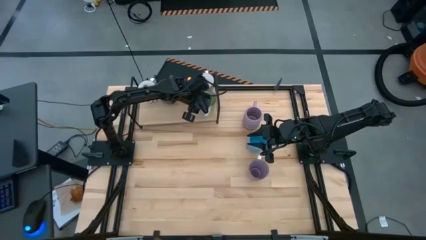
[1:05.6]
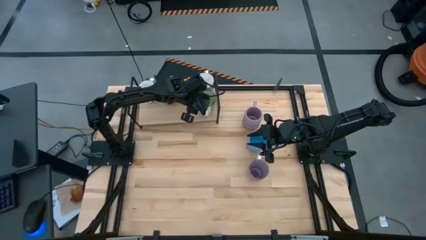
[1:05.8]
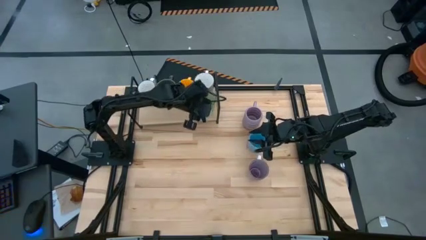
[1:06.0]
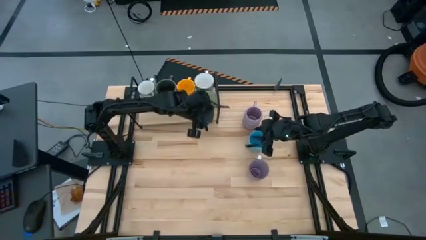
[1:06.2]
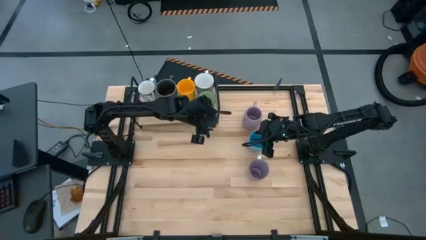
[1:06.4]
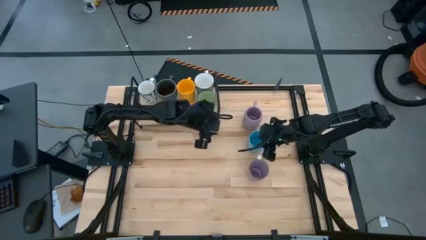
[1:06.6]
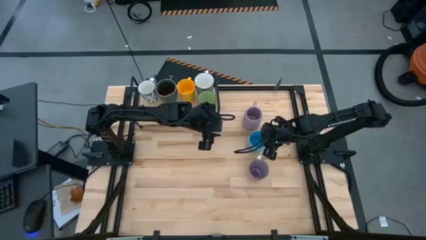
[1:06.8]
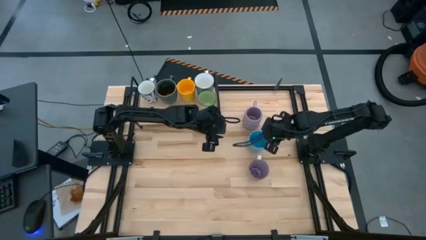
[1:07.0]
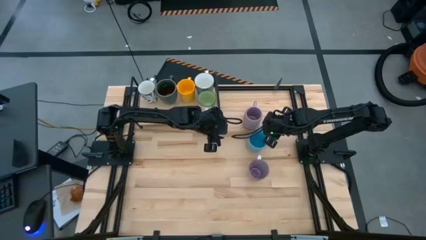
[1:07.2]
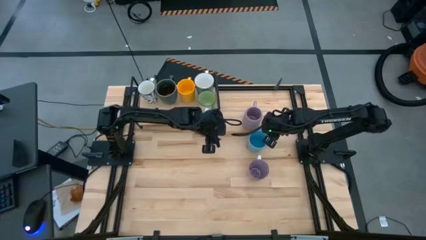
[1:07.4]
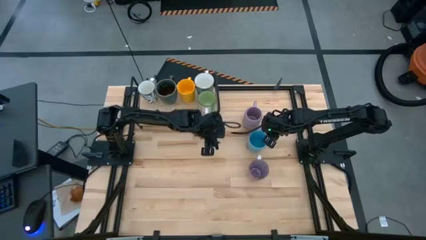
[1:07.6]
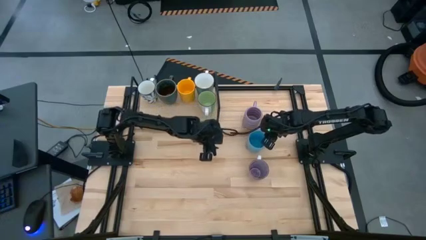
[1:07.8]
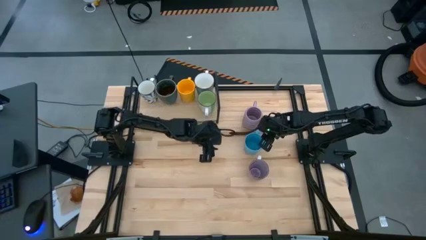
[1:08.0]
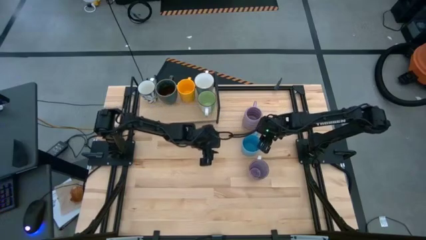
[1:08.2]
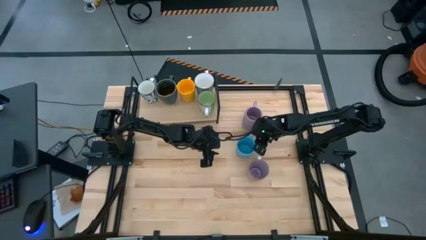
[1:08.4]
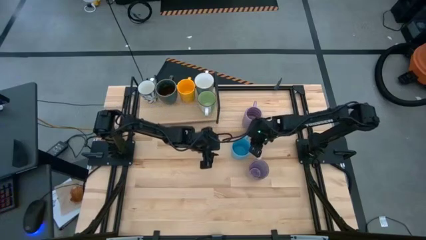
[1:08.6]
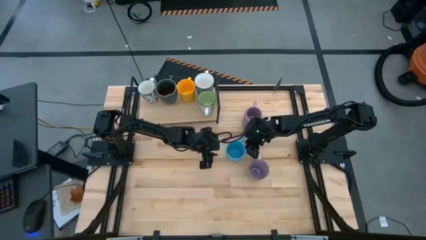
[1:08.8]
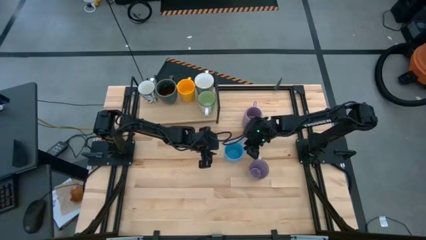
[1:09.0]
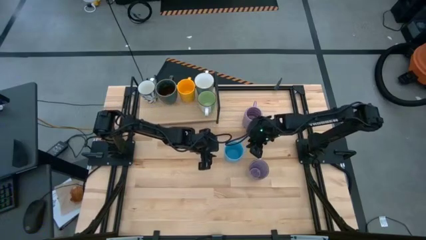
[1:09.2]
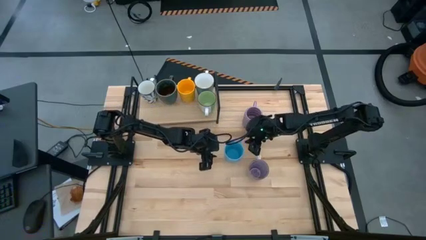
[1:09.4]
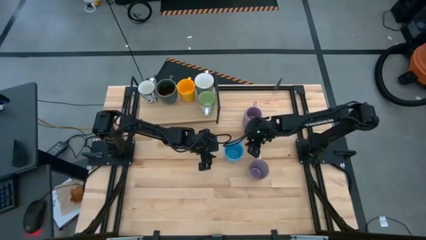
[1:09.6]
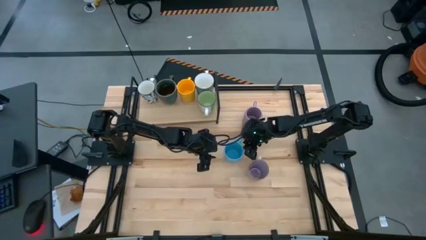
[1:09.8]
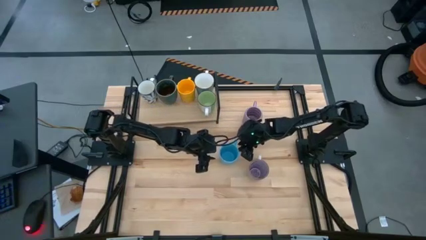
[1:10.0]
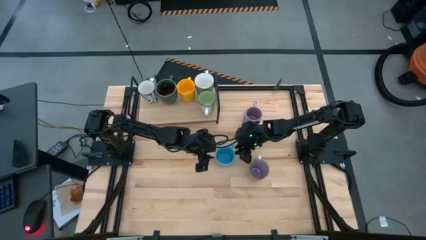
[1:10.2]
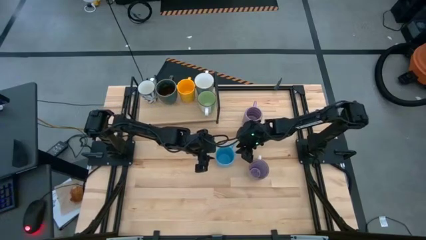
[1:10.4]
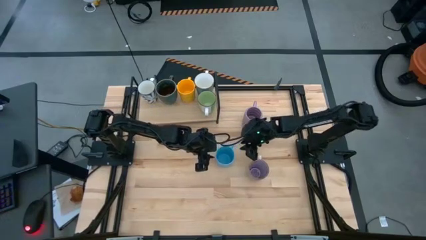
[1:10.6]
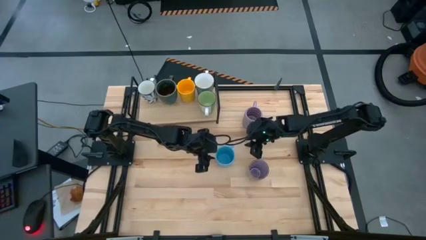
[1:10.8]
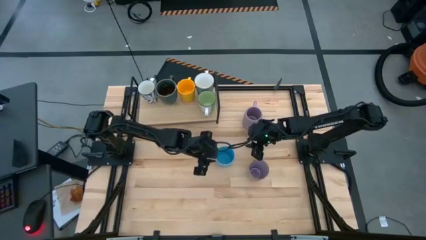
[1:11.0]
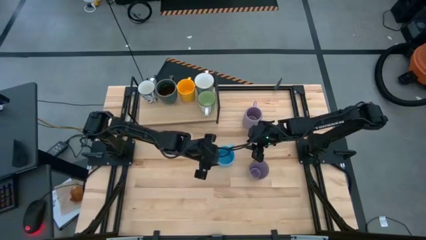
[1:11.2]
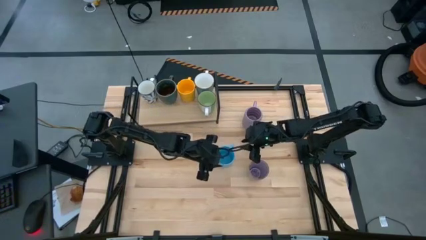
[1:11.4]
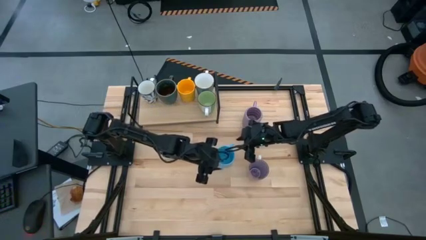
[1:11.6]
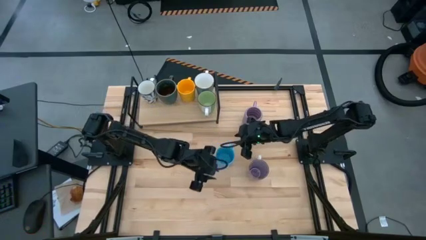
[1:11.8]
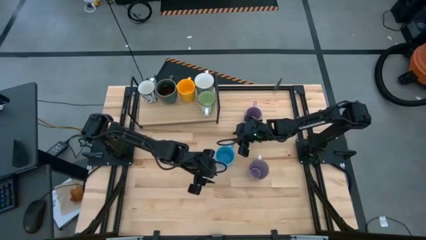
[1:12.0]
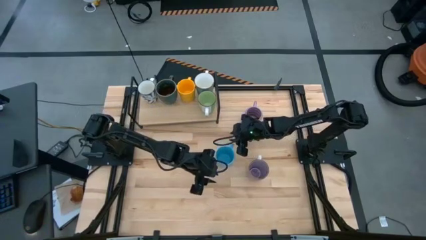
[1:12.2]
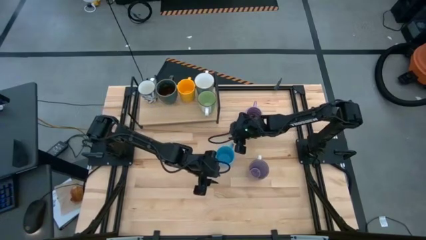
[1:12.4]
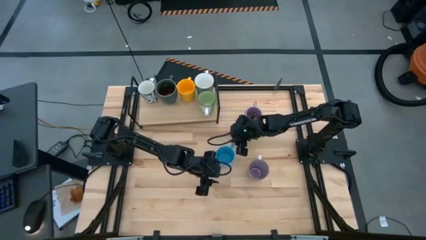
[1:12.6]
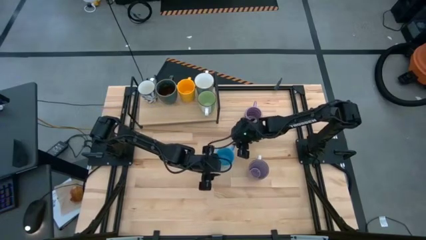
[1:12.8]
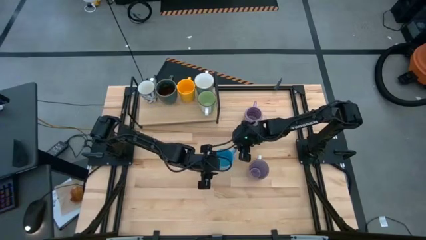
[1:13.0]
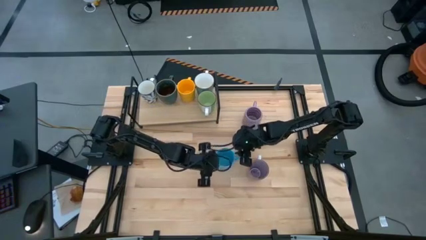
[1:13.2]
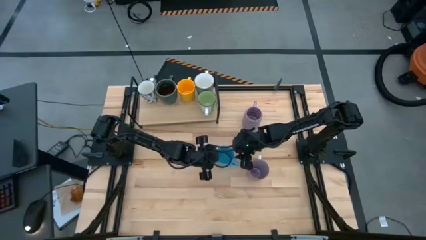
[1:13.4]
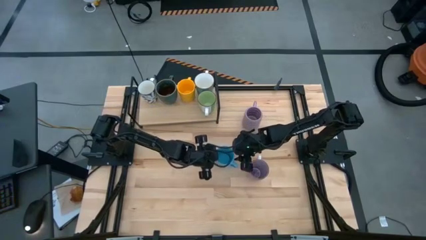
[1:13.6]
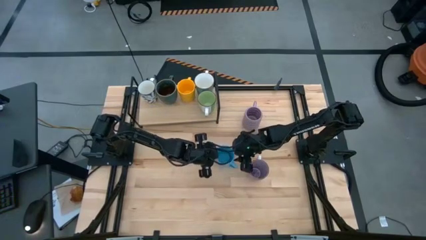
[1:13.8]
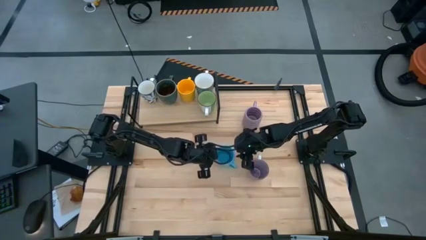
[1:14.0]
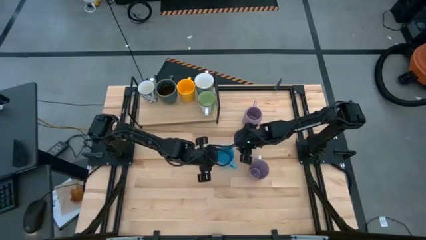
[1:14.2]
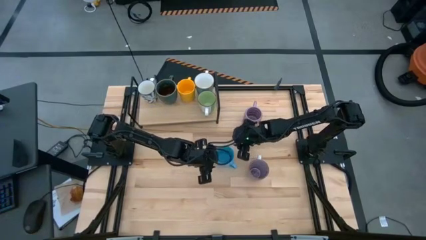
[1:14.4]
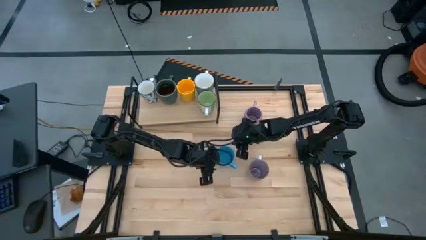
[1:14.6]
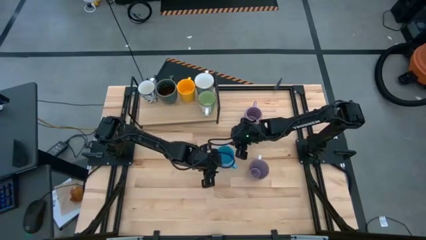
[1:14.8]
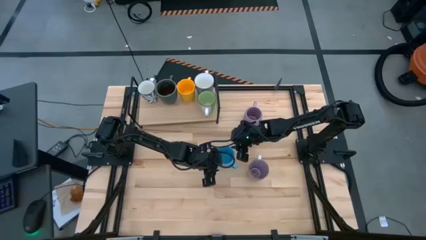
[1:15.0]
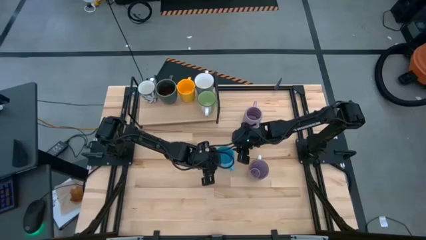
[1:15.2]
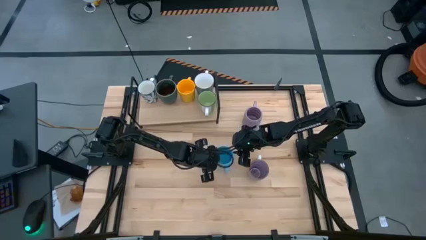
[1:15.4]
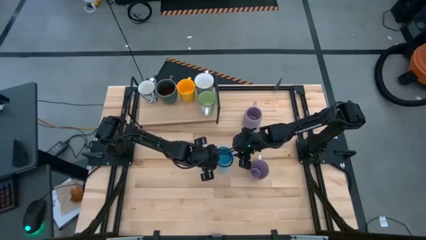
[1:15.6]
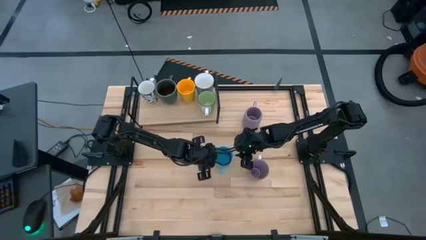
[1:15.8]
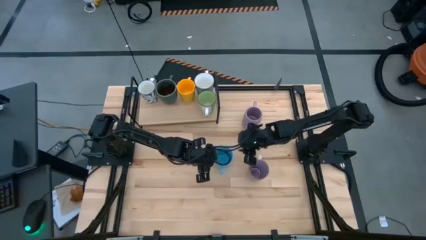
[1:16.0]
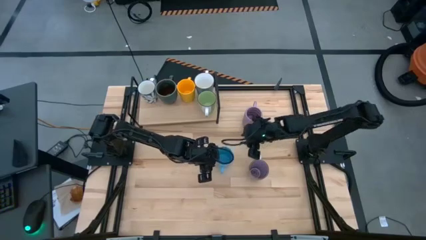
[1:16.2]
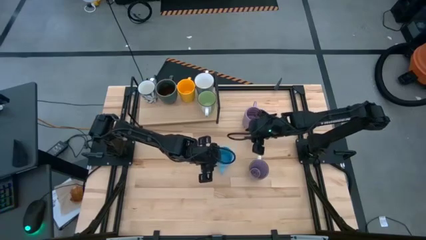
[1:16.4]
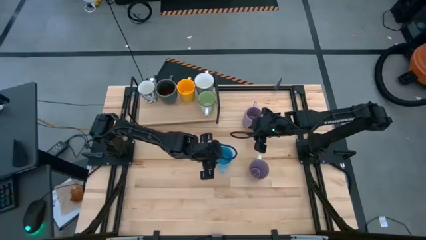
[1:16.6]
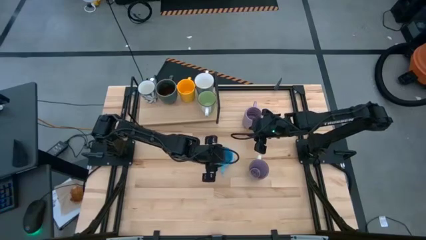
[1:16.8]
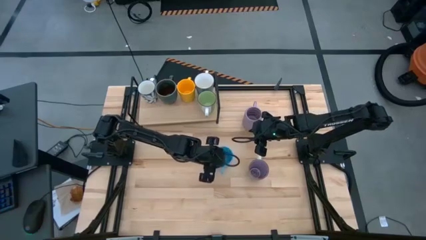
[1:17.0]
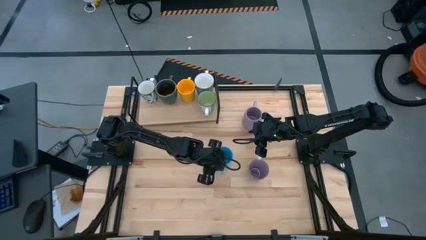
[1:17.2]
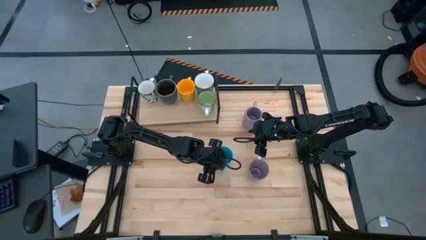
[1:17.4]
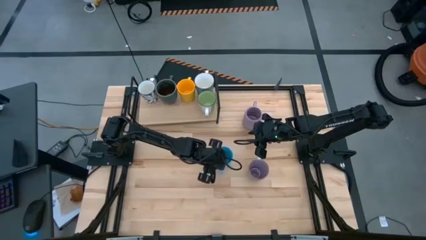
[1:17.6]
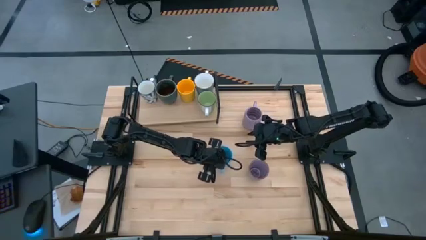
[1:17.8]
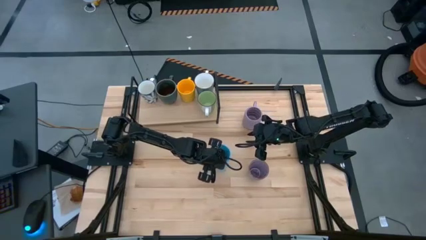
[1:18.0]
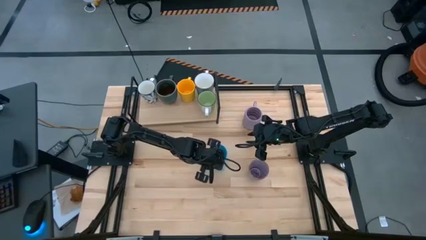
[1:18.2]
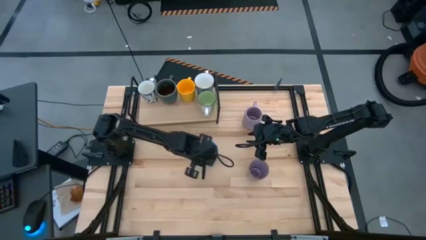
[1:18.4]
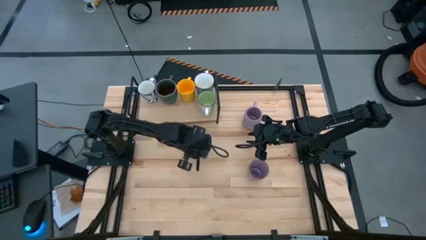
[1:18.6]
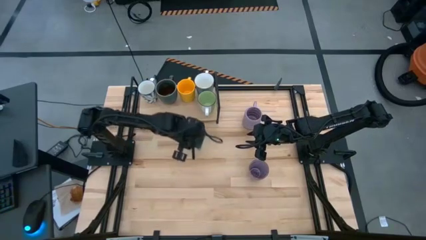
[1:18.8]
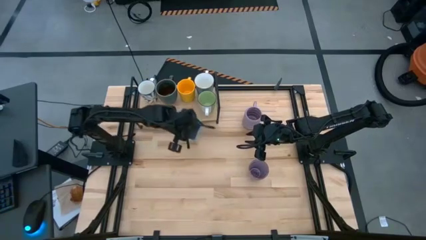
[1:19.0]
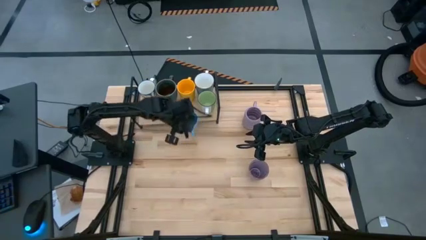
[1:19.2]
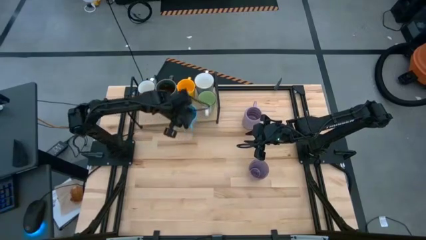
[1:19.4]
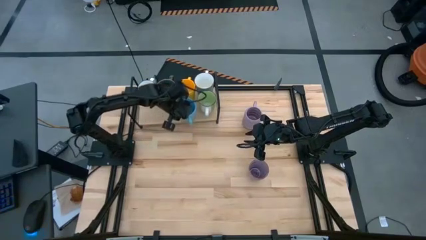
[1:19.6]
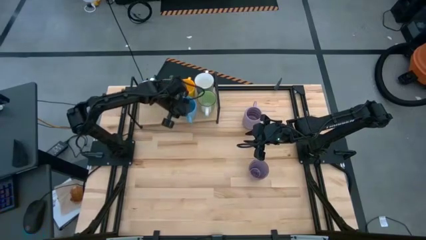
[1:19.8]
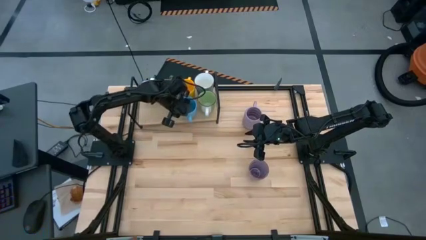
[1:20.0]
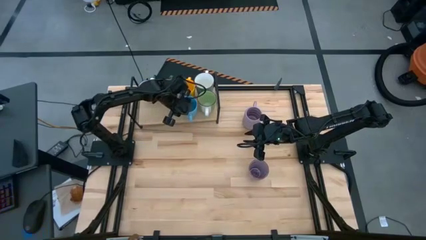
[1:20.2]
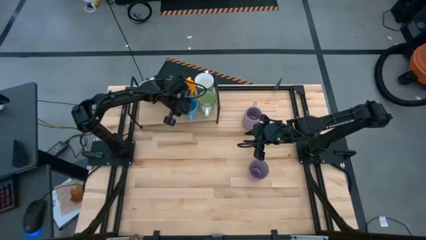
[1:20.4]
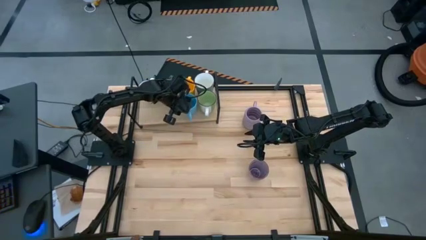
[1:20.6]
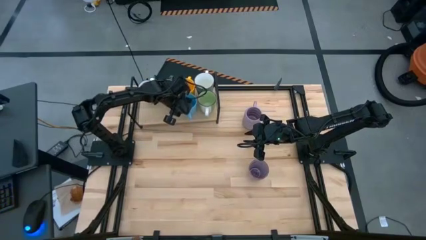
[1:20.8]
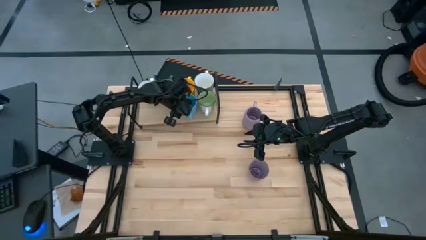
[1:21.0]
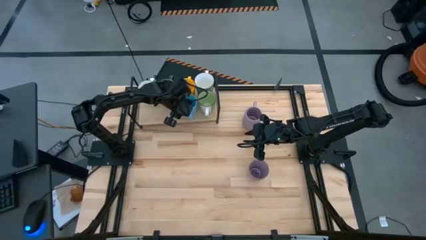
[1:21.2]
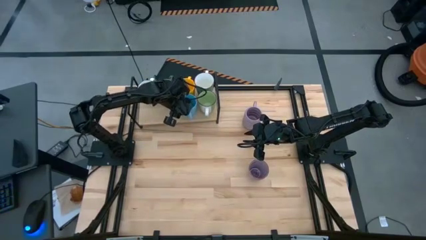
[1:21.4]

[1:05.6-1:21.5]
Task: Place coffee mugs
Put the blue mug on the shelf
